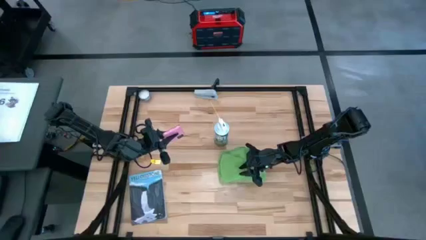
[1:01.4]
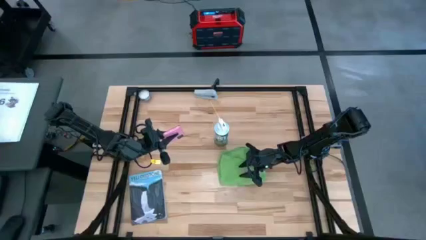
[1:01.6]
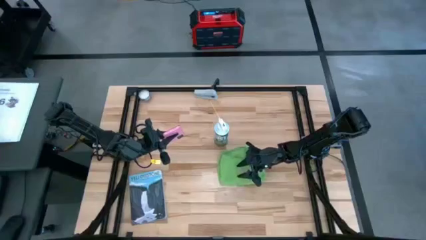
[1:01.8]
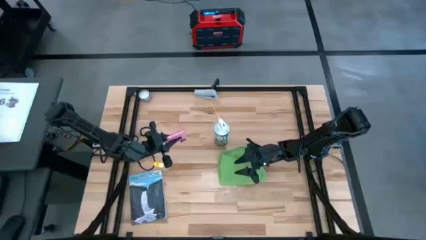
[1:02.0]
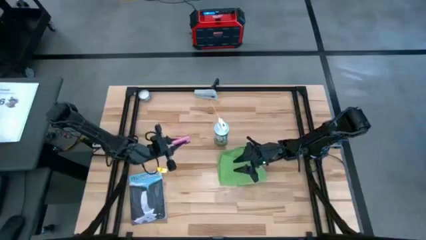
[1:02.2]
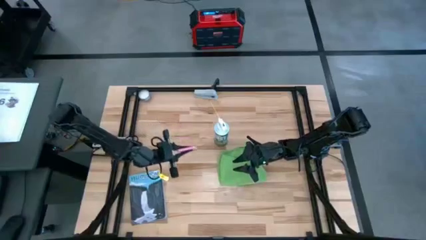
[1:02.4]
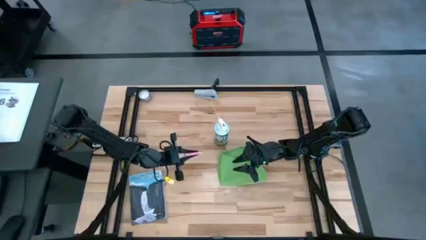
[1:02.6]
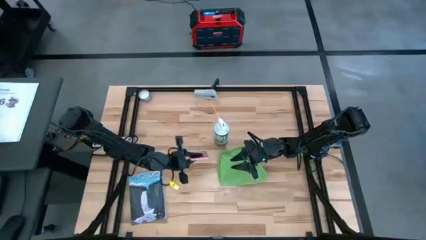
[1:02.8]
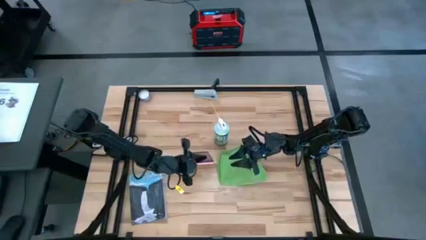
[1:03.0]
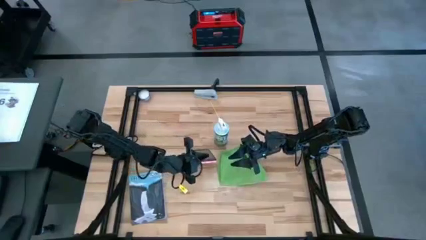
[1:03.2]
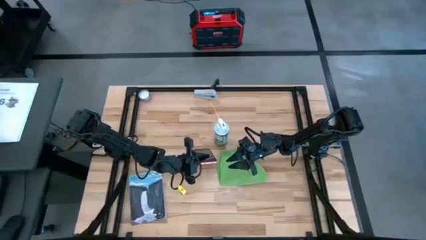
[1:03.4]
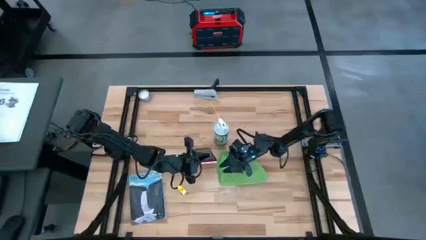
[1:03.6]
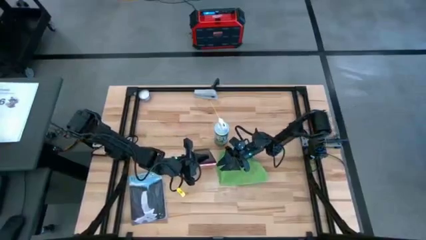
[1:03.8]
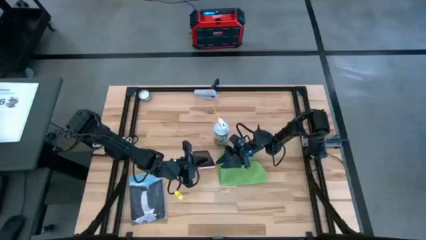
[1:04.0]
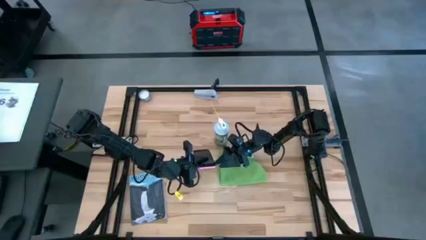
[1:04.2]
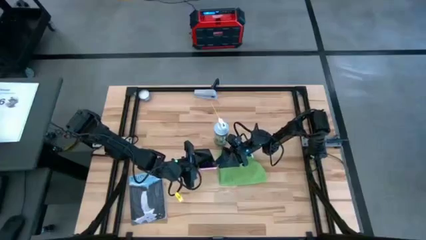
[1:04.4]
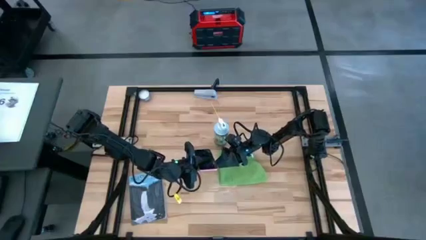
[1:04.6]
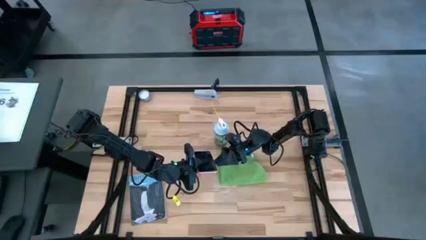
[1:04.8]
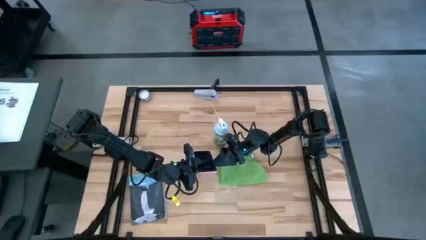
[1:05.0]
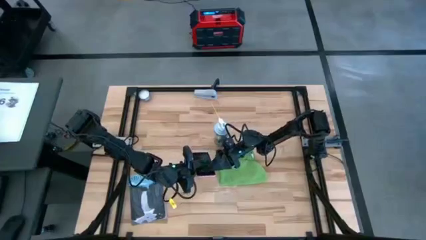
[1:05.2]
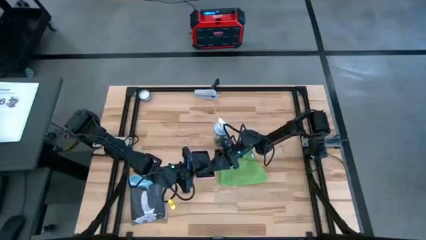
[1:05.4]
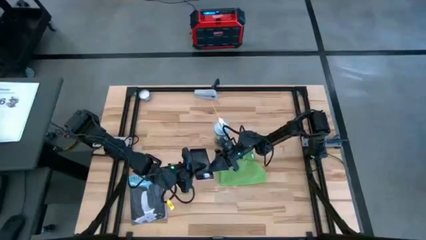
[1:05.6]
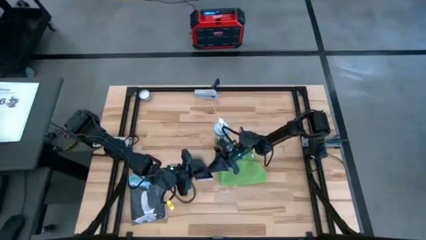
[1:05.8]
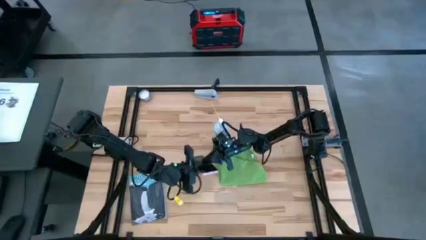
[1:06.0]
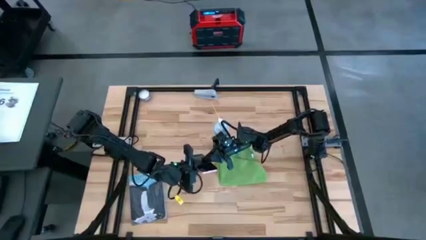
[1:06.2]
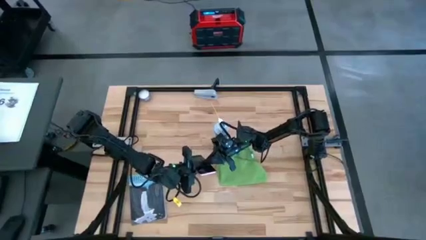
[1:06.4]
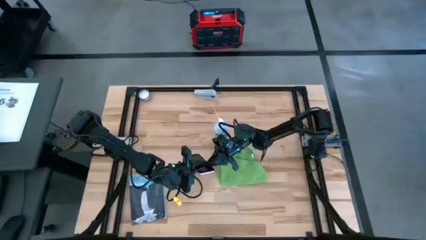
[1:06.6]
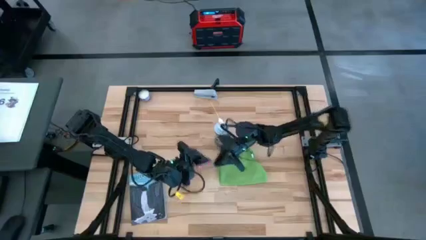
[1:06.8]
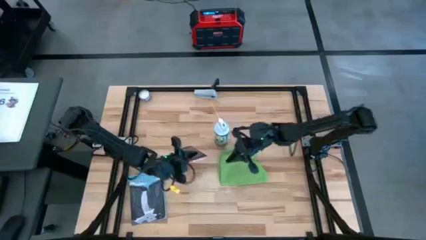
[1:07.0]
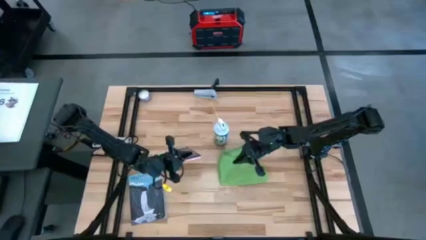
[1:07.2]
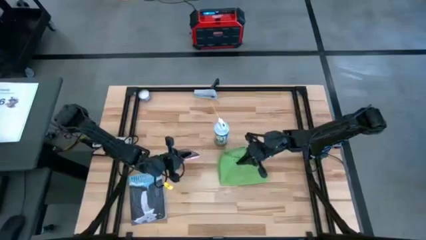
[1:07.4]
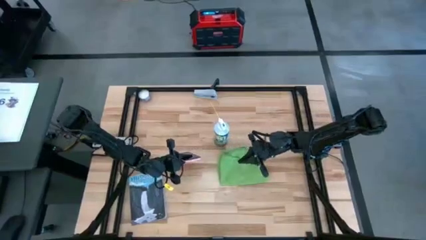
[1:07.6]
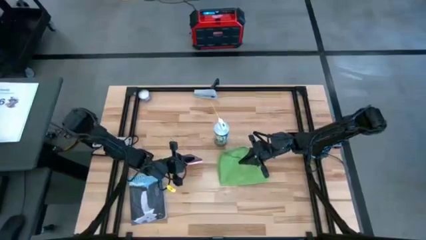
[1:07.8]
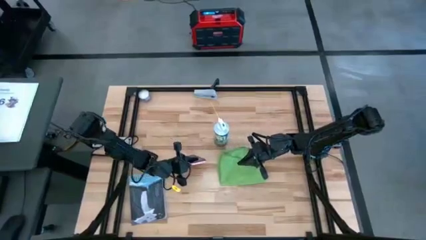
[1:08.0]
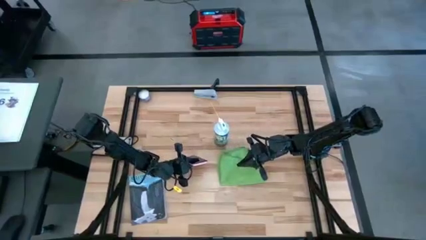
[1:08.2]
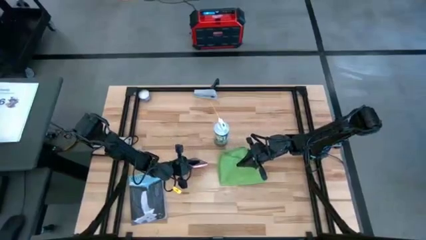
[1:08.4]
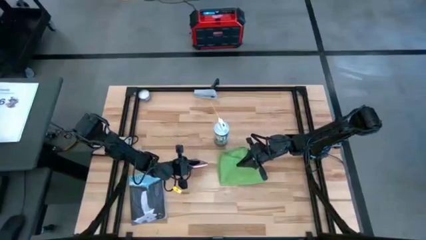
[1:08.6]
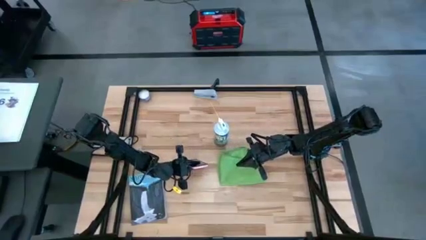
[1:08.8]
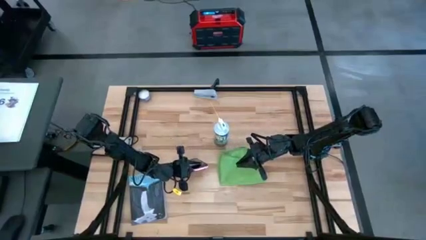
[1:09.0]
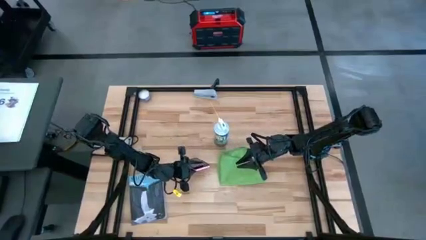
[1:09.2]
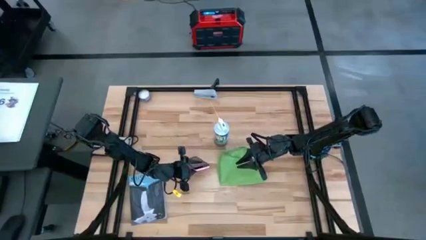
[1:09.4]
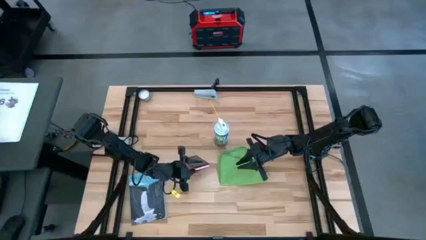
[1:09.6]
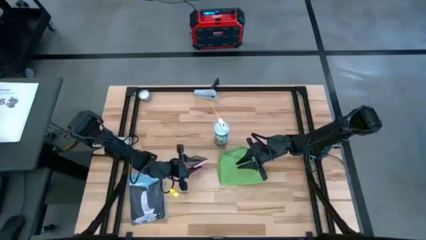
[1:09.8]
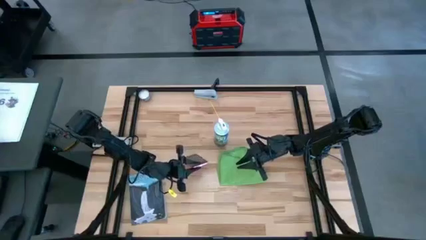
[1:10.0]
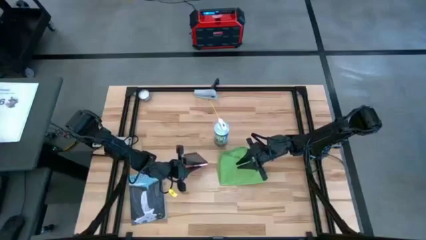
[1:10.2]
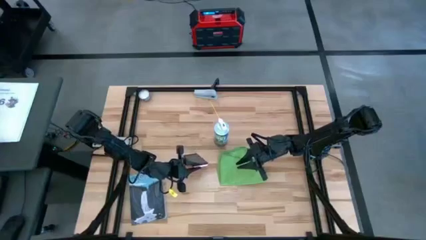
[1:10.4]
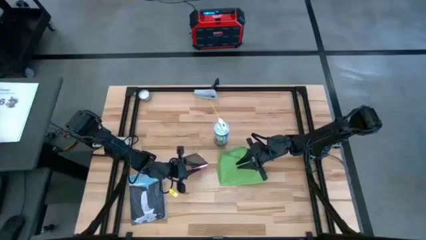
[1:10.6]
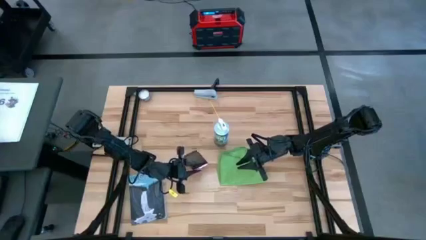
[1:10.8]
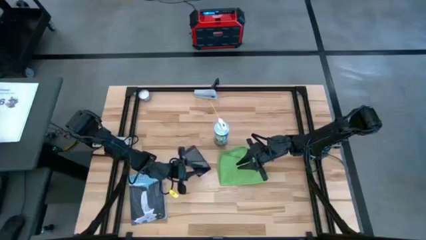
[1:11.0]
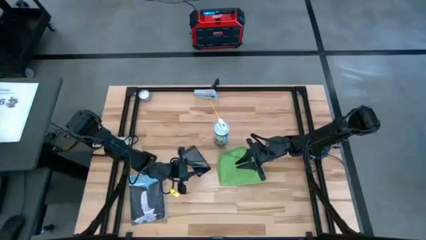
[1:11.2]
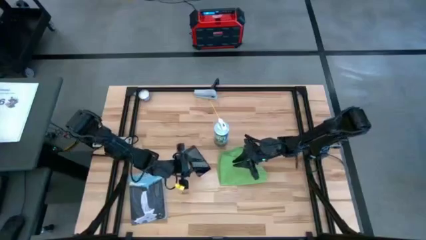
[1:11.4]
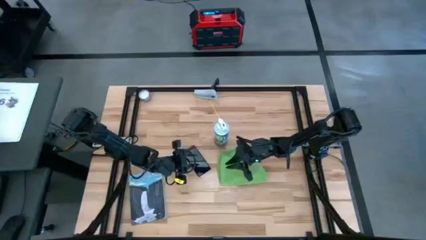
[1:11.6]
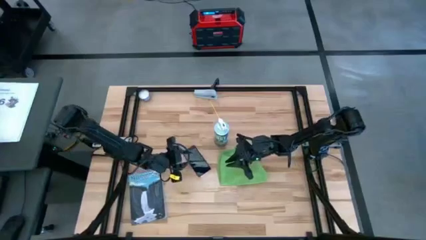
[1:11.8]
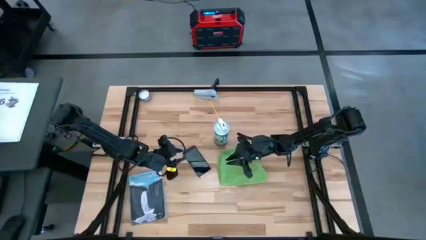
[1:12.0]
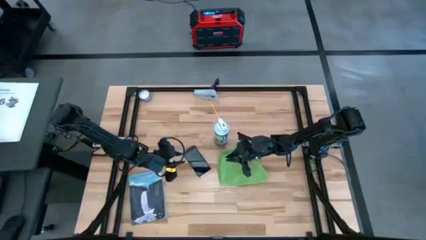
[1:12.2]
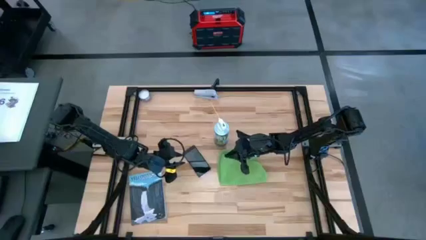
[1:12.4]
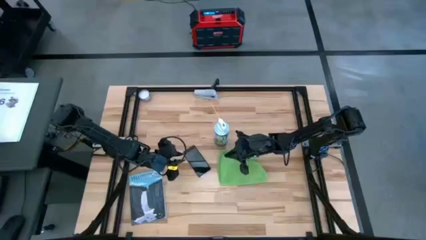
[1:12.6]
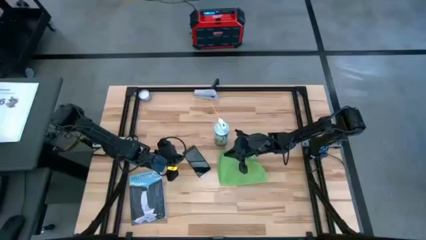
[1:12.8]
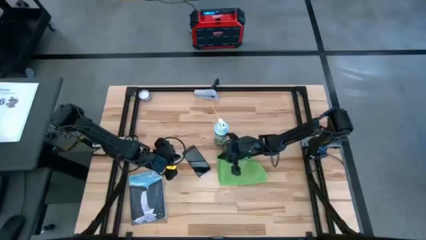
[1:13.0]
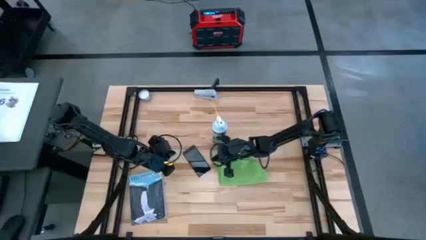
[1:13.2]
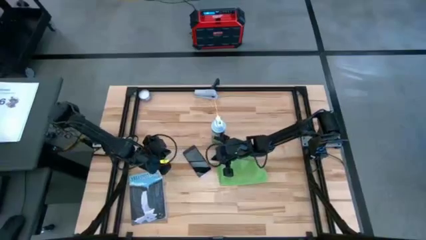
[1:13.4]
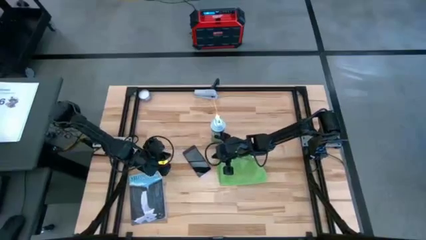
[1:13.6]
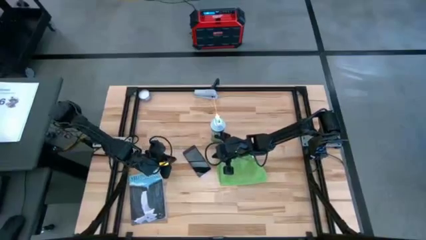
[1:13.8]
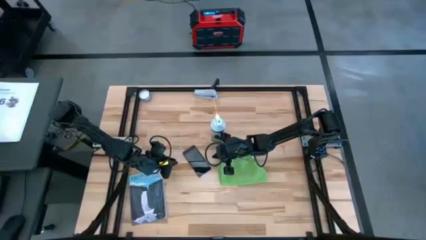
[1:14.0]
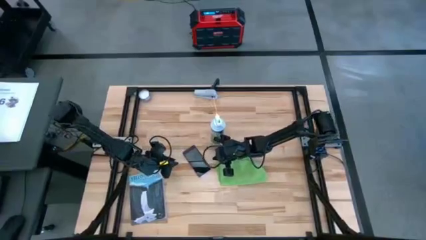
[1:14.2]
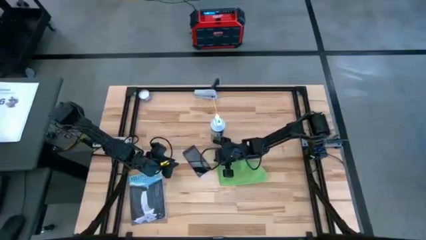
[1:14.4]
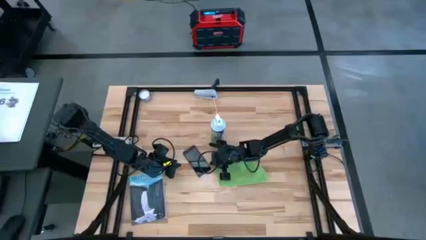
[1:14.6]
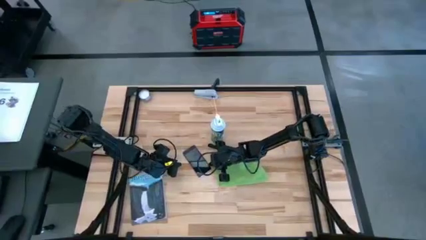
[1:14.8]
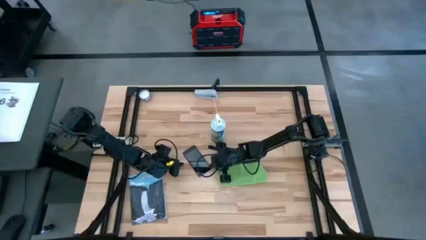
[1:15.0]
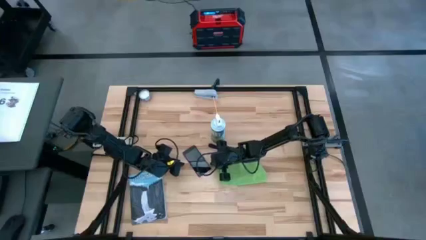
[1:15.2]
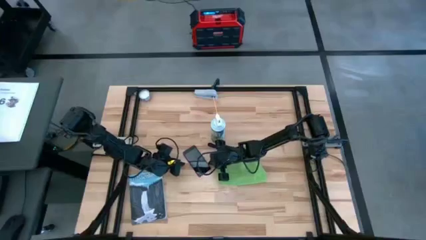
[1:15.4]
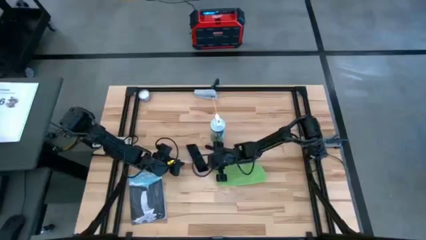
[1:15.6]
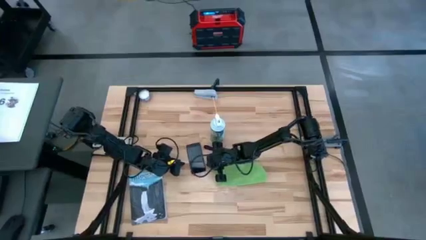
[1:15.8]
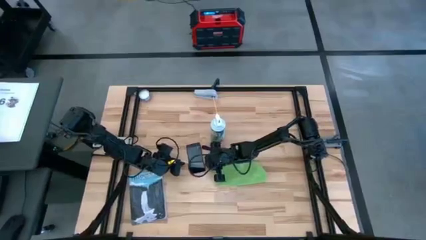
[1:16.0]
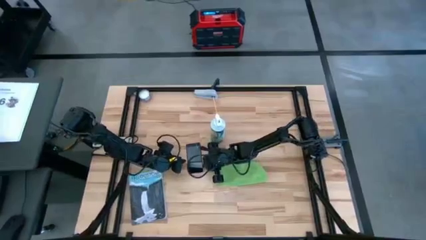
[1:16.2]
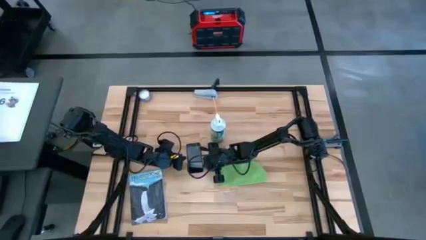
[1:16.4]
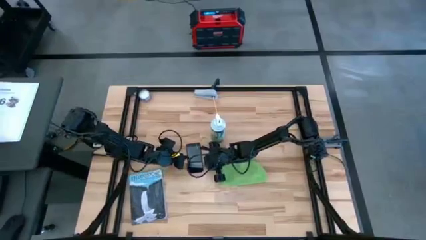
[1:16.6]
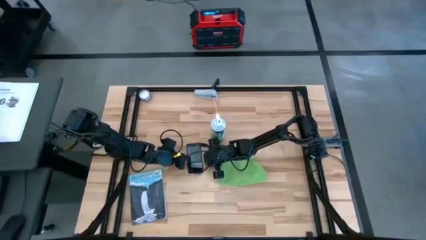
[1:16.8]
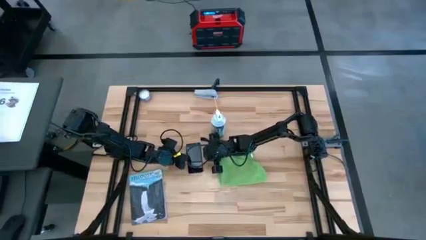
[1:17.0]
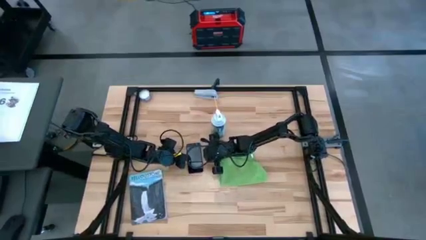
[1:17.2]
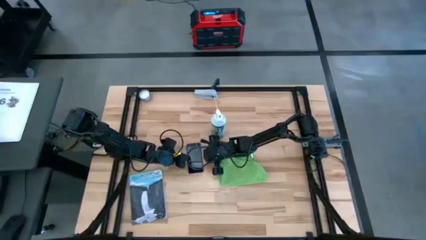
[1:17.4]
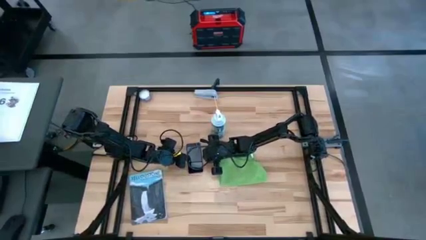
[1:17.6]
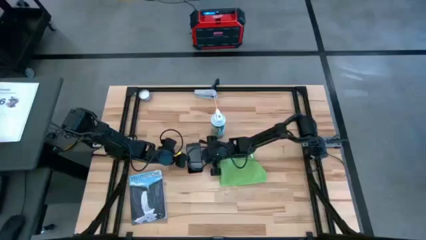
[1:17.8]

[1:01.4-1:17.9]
Task: Apply microfiber cloth
Spray the pink cellphone using the spray bottle
